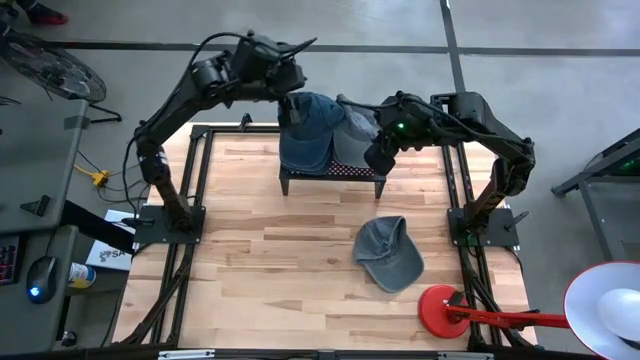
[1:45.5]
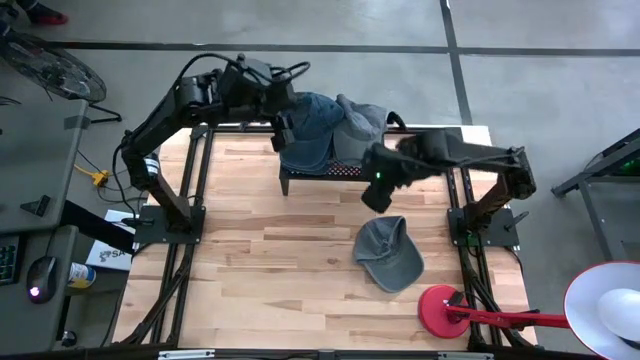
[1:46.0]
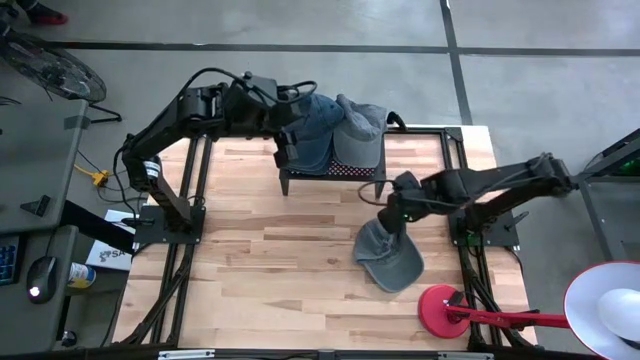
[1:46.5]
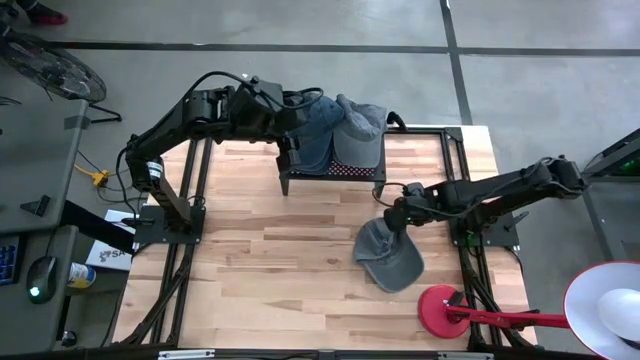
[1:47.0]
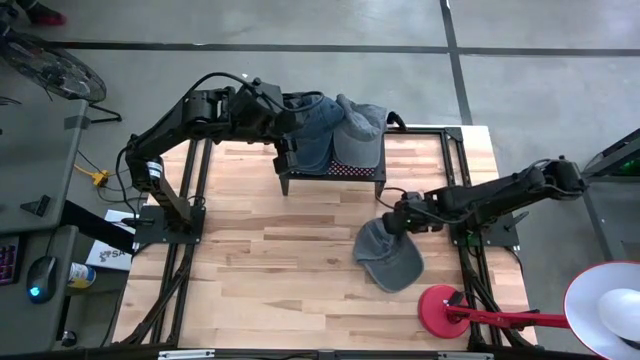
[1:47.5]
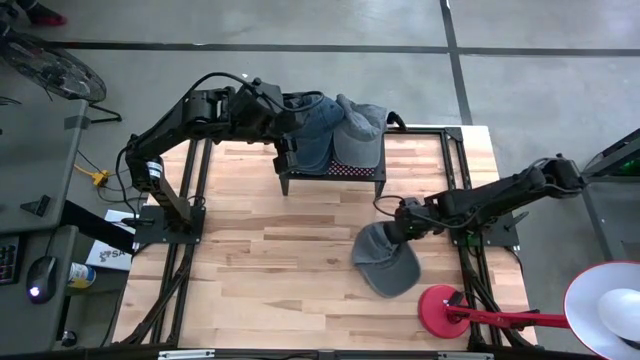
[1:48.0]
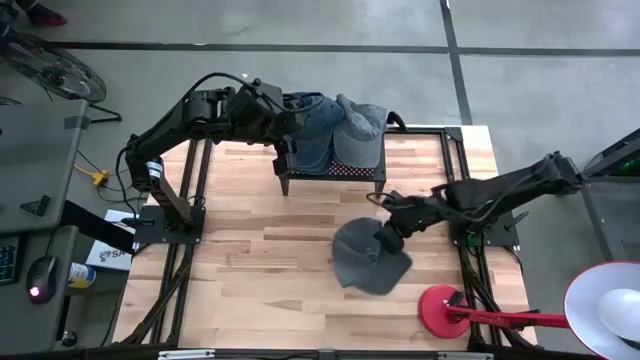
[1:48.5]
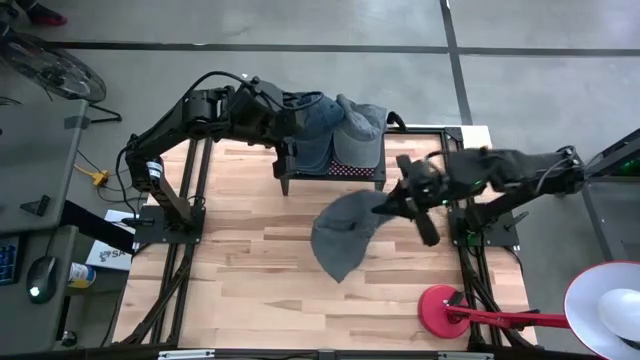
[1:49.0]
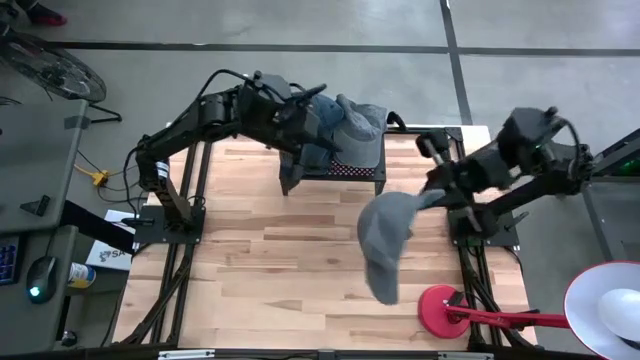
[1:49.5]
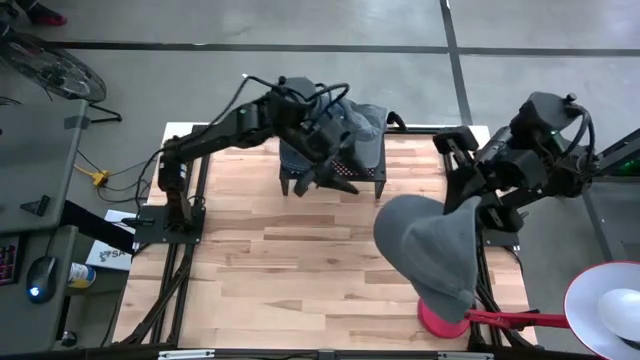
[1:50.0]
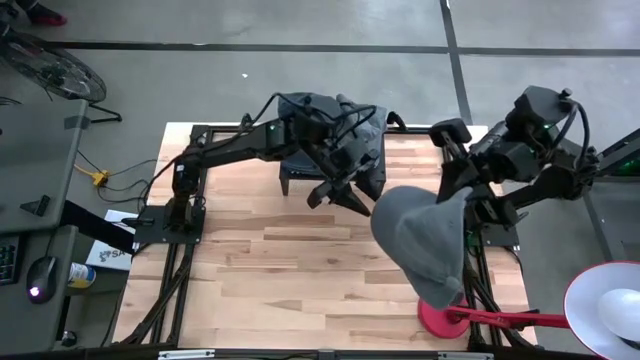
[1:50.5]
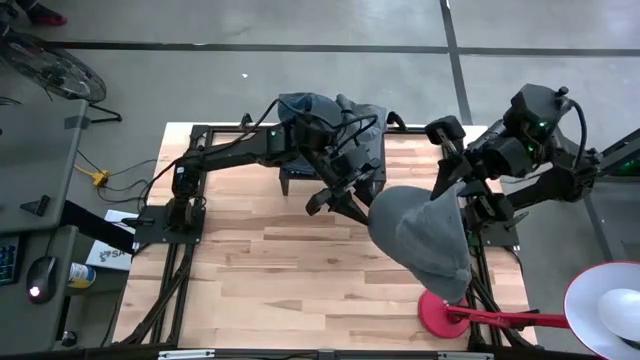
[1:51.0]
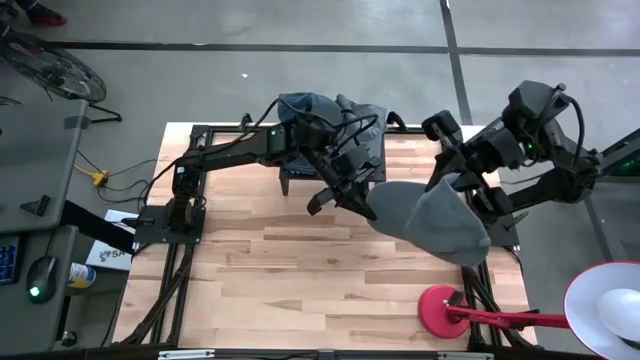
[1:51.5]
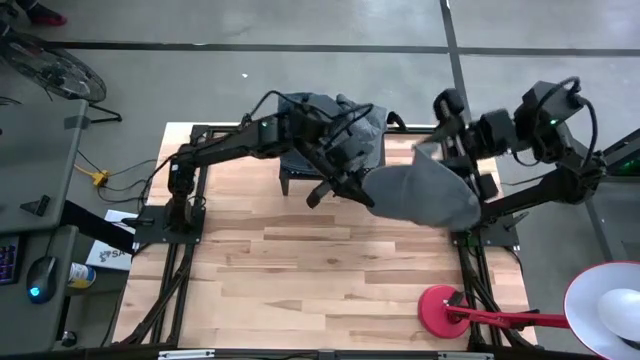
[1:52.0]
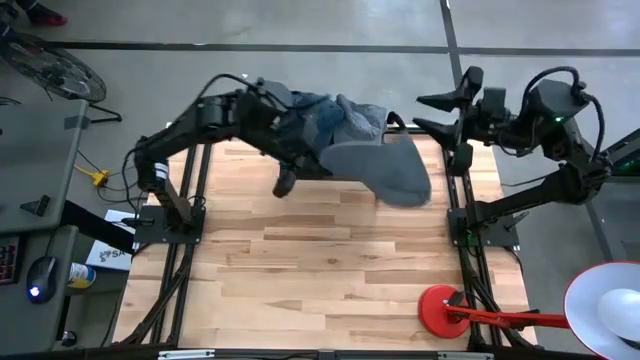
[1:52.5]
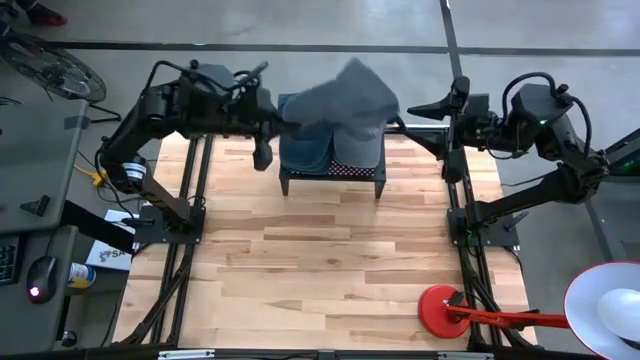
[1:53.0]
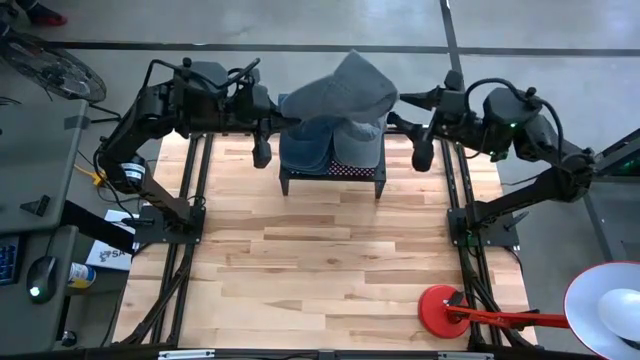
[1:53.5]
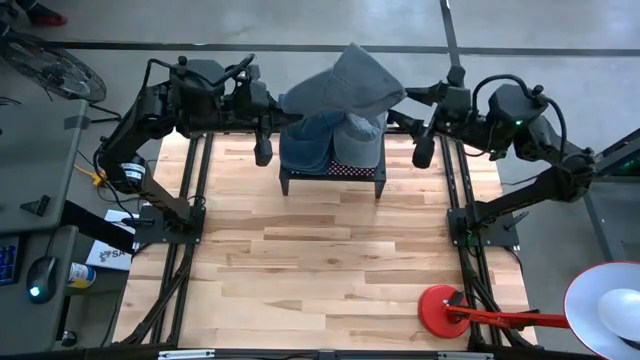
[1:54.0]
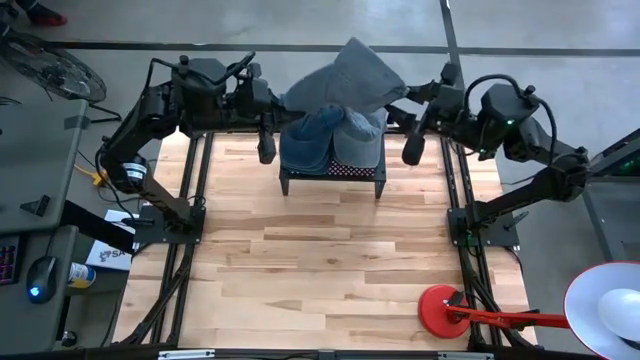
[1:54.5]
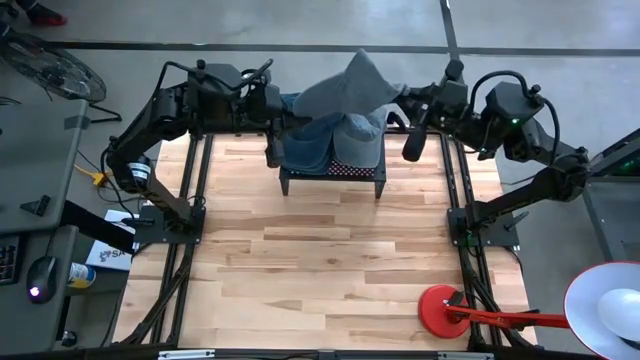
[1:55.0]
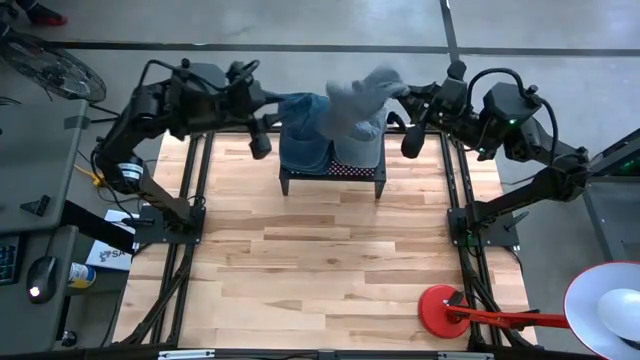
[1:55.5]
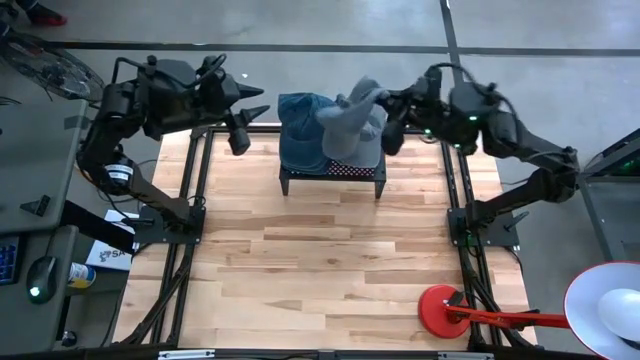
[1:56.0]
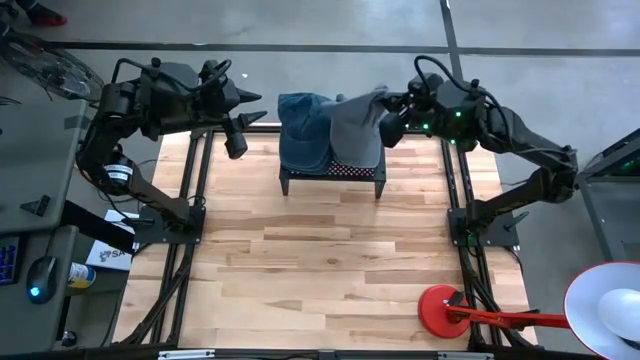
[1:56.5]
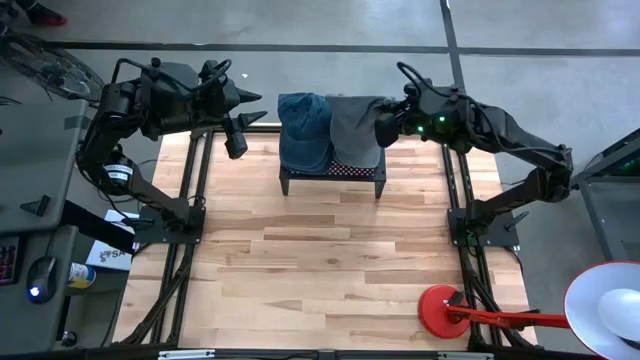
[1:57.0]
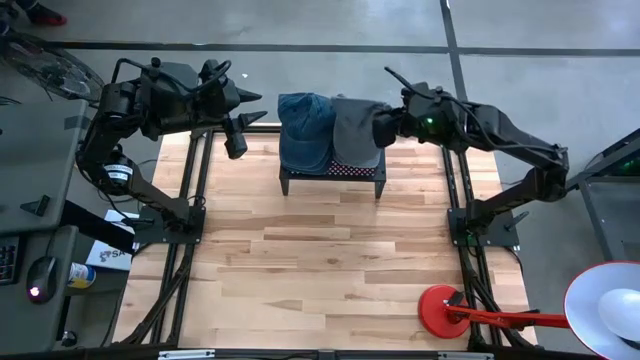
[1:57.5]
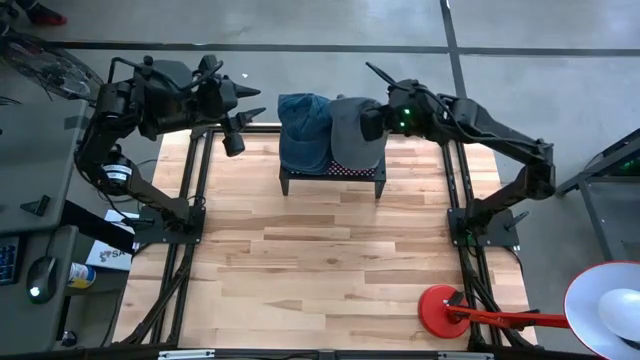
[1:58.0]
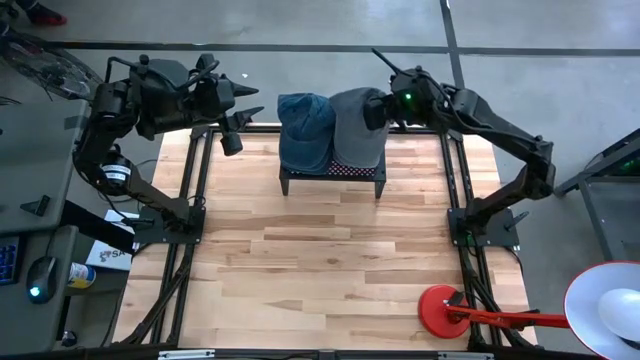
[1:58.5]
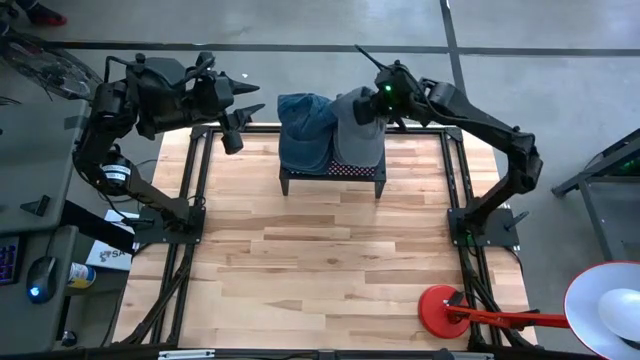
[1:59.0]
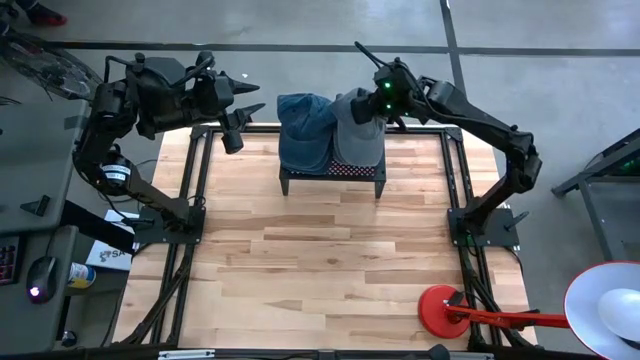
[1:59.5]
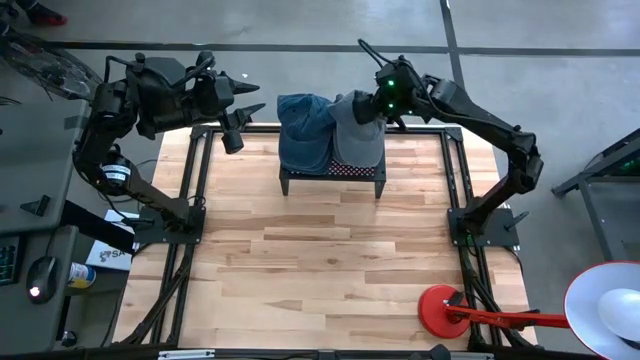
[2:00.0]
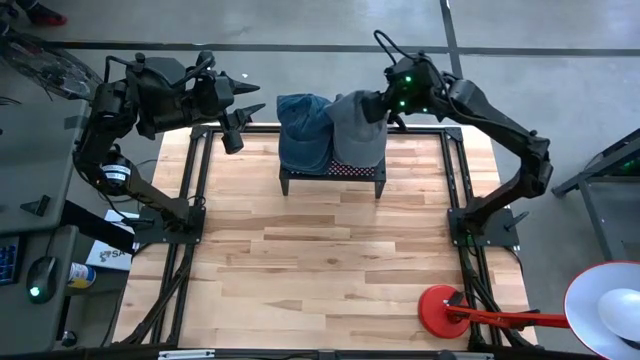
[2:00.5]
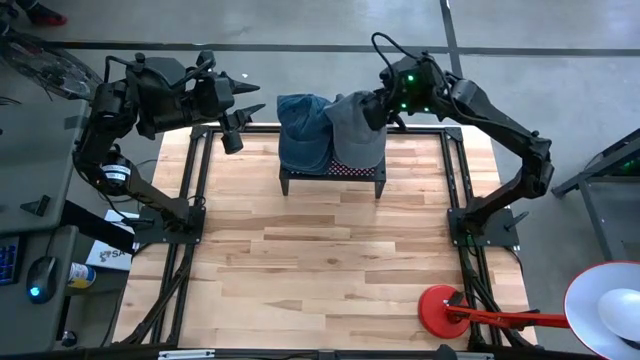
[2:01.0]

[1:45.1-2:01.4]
Task: Pick & Place hat
Stack the gray cap on the gray cap on the shelf

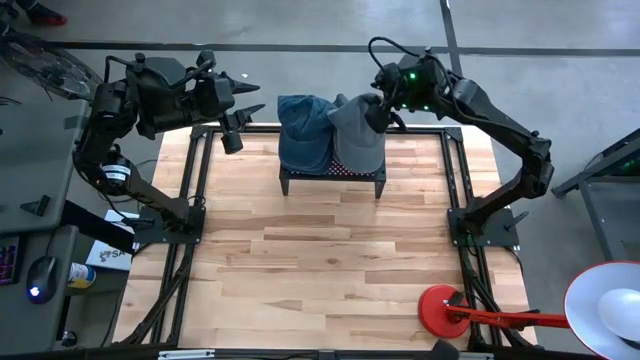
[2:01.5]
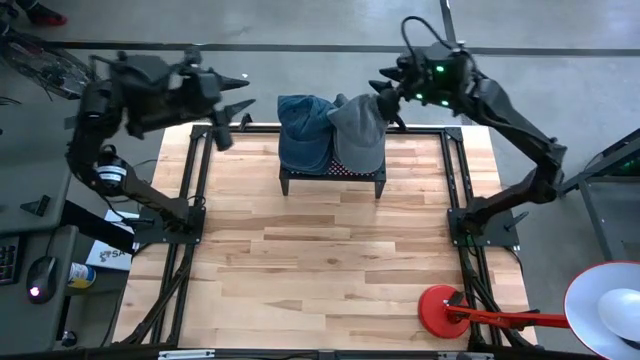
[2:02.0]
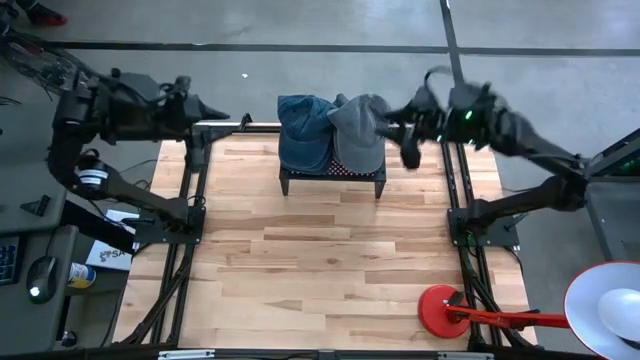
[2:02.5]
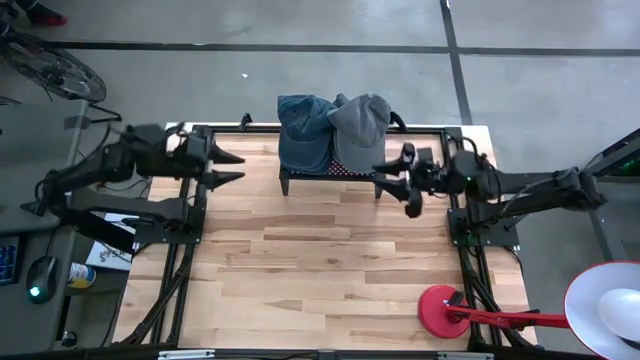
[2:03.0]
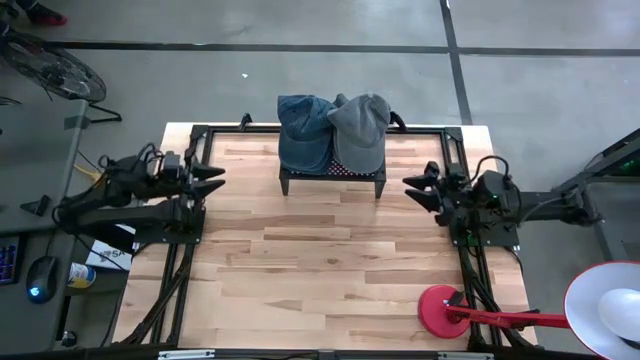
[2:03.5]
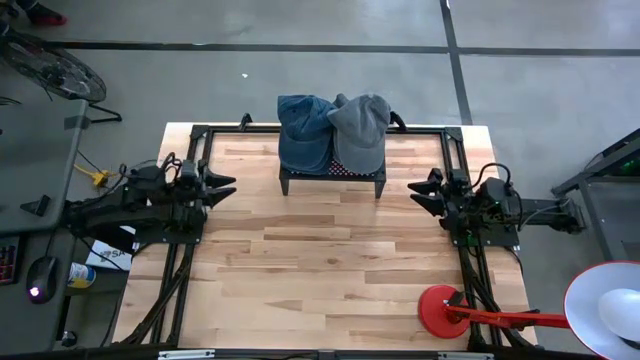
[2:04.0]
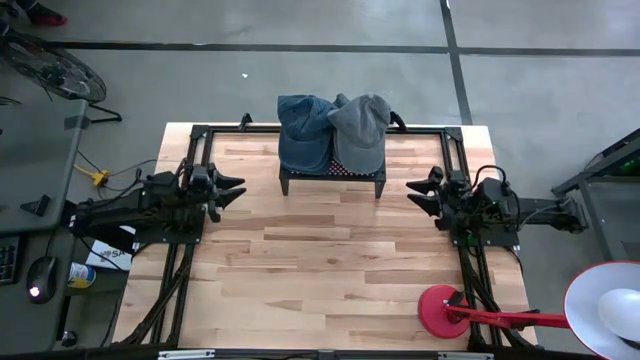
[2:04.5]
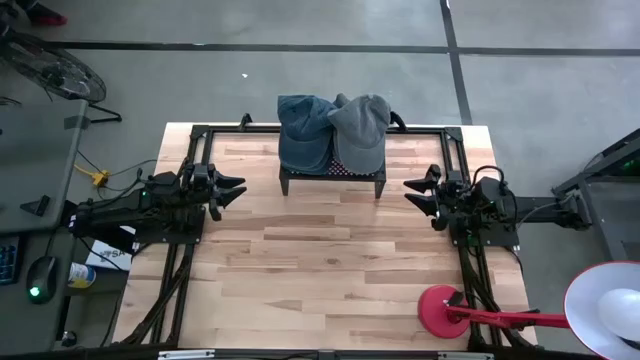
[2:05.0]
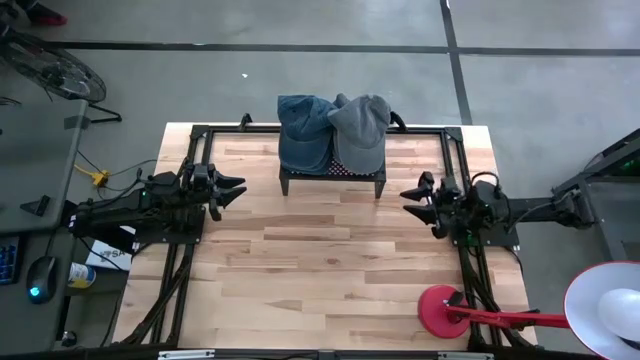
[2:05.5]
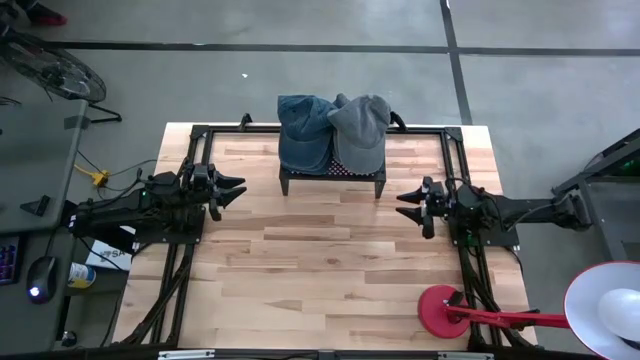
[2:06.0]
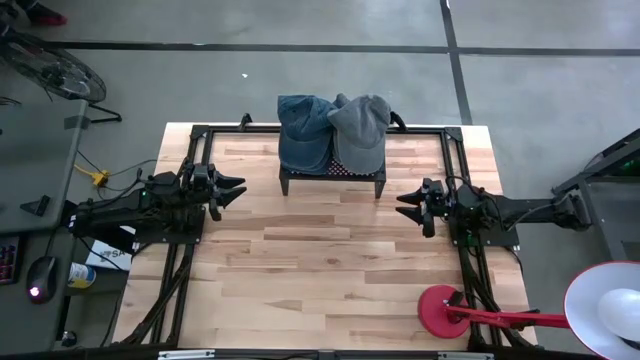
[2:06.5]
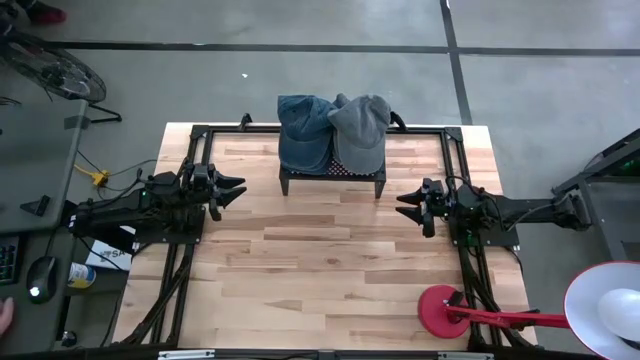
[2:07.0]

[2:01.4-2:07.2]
Return to Home Position

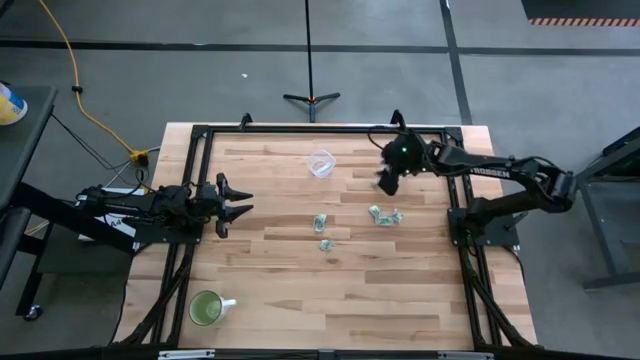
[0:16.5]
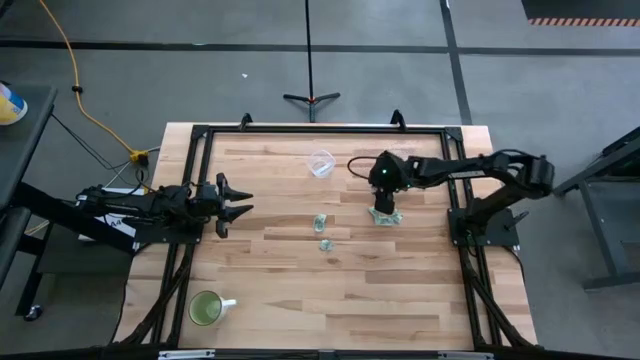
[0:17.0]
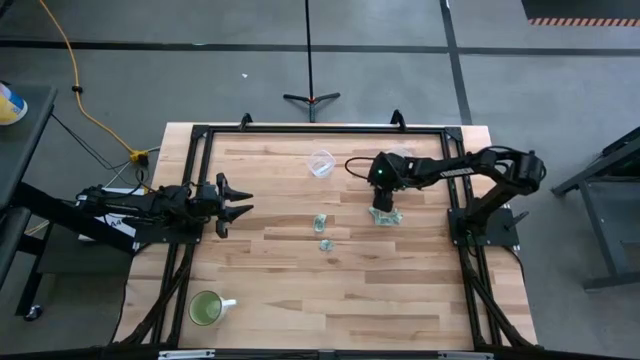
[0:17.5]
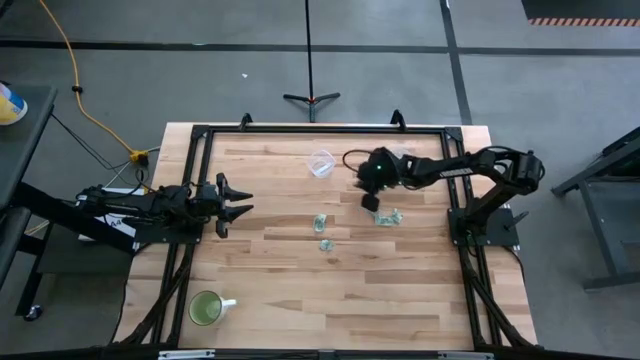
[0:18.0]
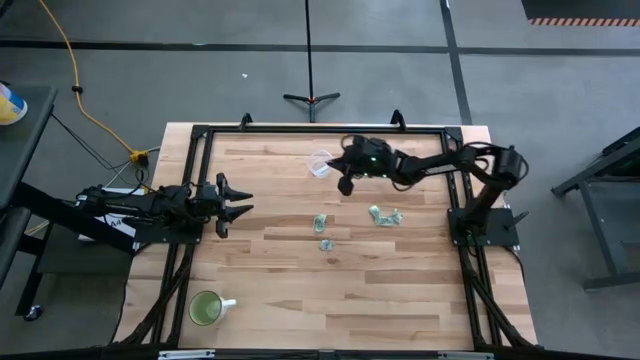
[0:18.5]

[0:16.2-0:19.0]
Task: Pick and place Stevia / Truvia into bins
Put the stevia packet into the left transparent container
